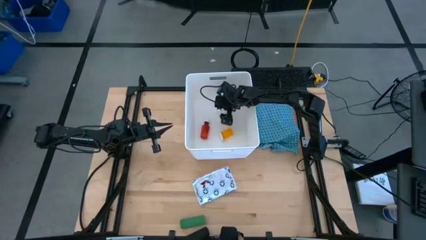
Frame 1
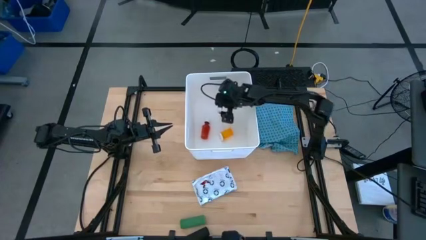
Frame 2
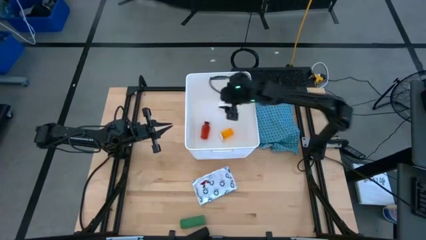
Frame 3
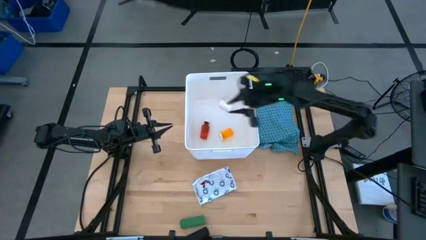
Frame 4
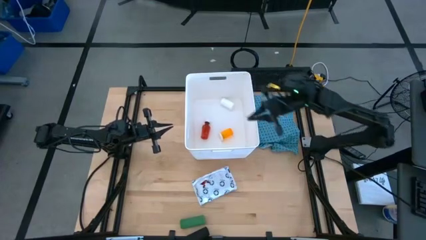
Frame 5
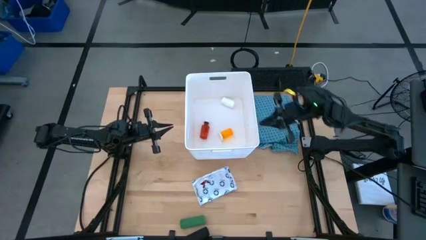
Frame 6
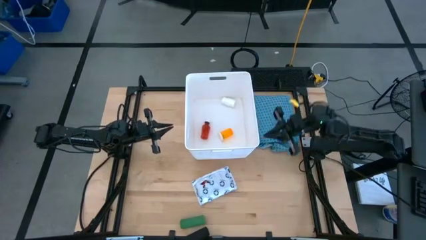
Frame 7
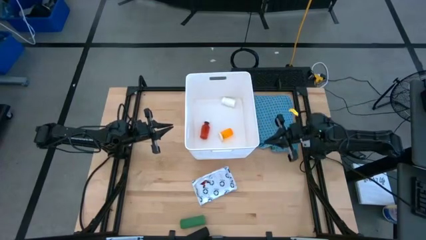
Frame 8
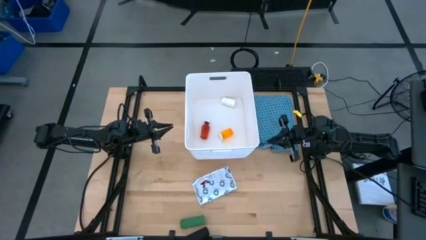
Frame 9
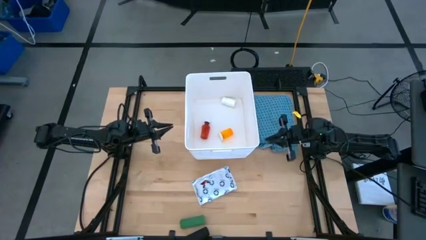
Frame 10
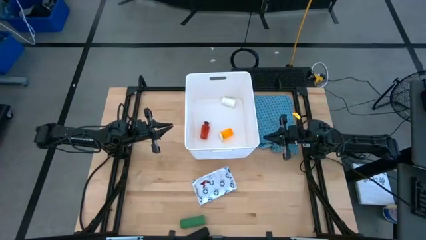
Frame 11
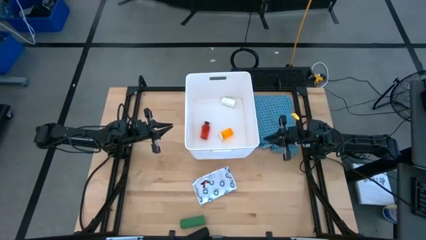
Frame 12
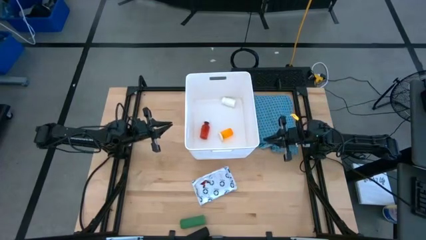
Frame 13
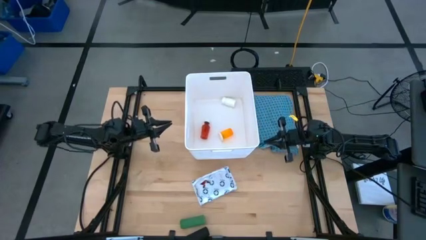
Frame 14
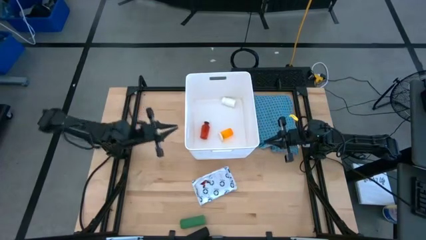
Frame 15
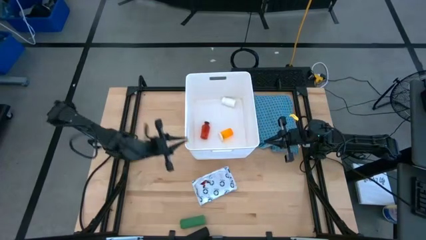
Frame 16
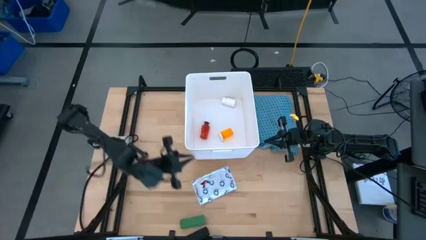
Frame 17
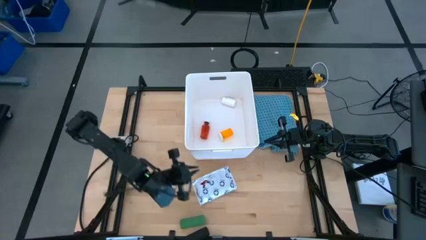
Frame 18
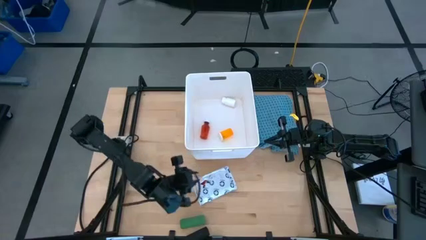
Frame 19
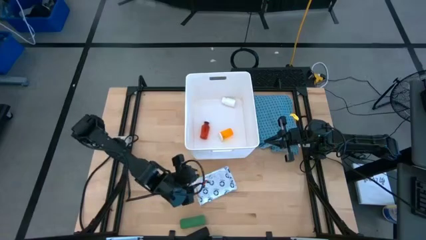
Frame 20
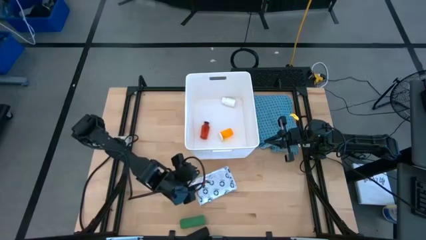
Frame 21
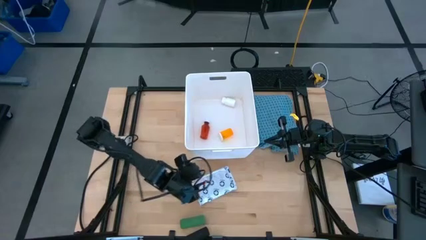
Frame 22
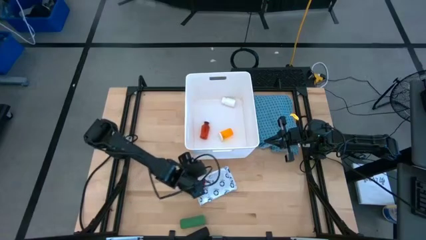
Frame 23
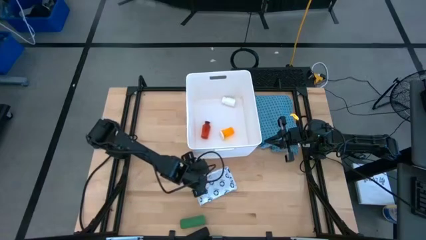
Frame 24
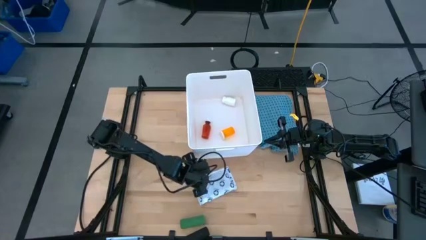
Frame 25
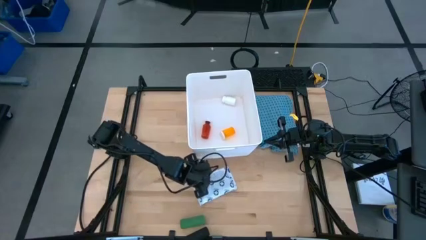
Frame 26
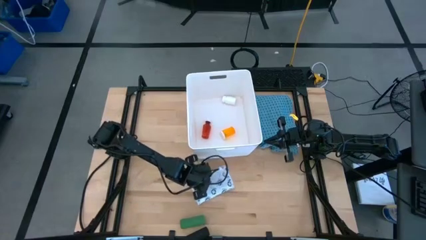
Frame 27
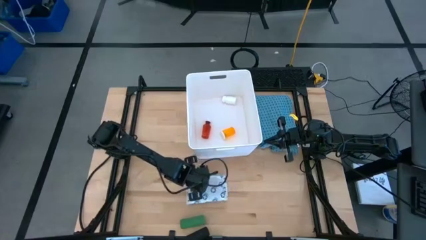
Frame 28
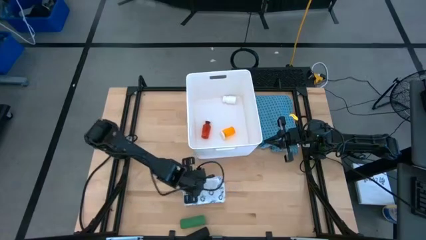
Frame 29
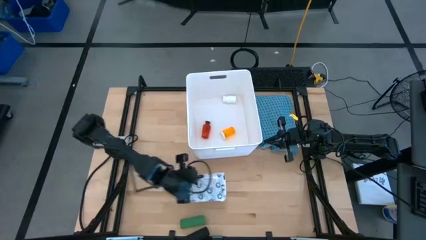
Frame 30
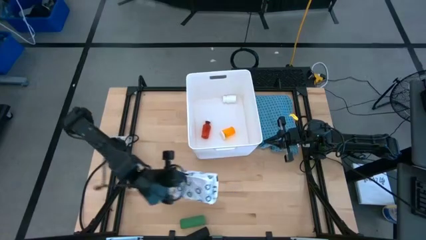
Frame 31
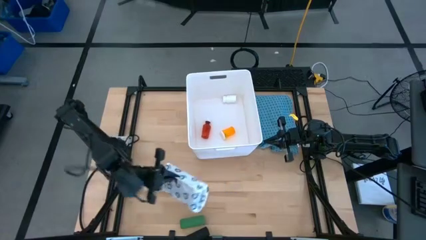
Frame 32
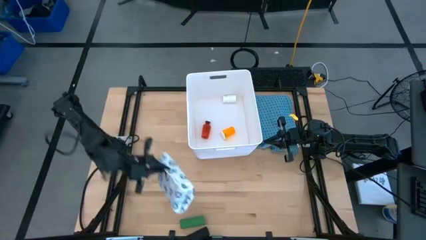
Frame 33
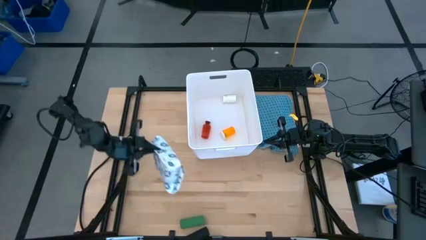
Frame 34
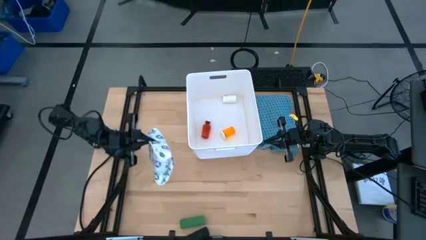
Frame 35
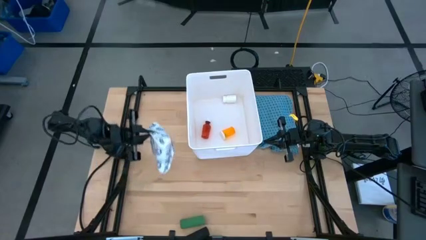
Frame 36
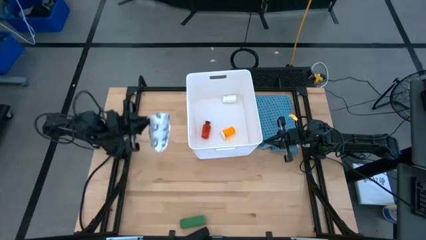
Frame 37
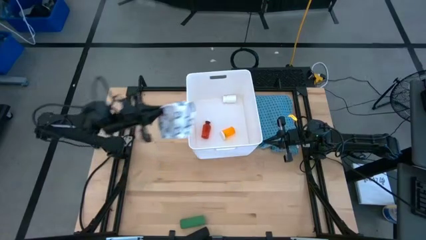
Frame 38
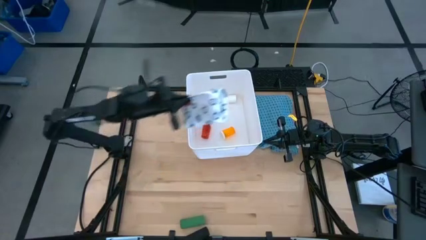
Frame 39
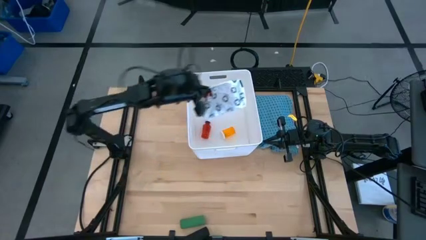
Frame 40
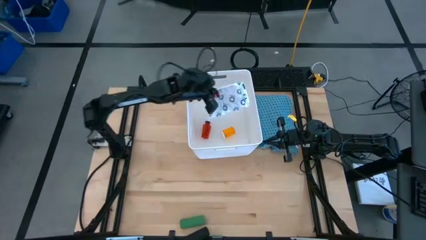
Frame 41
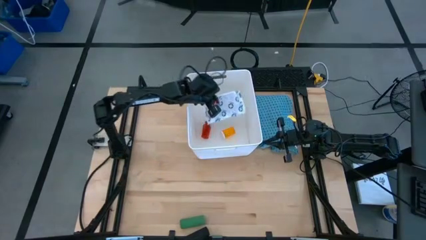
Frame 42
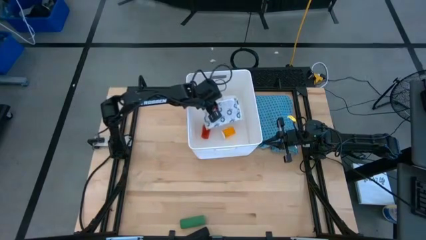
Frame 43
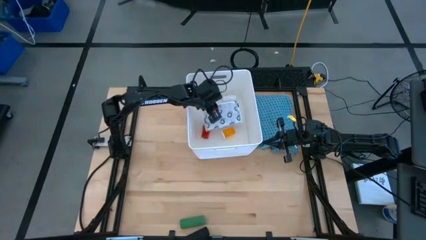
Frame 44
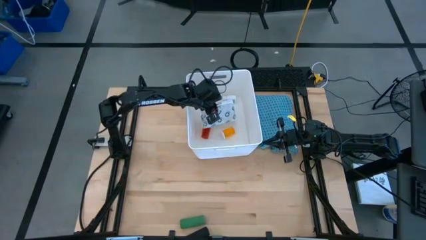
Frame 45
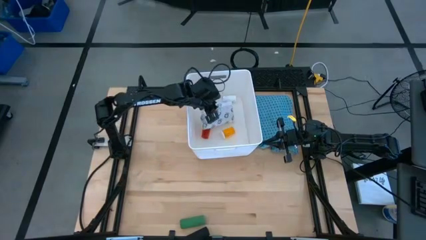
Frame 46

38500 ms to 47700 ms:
Task: Pick & place medical supplies in basket/bin
Put the mailer bag into the white bin

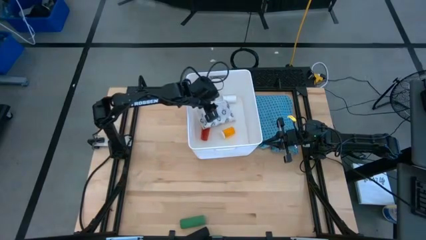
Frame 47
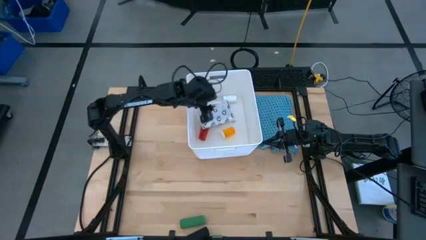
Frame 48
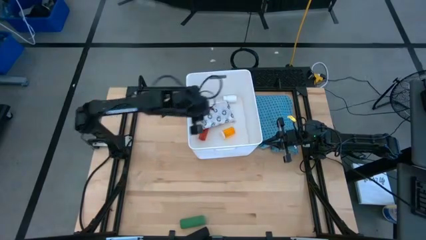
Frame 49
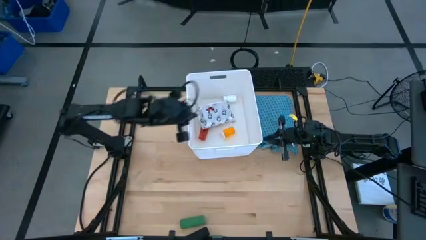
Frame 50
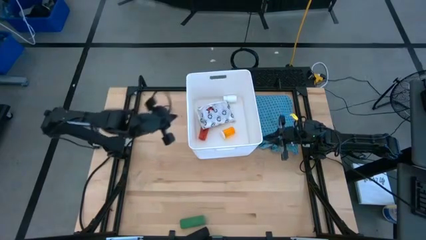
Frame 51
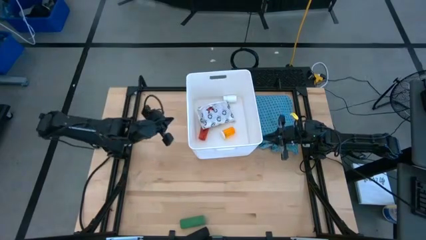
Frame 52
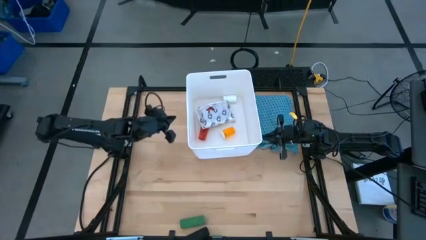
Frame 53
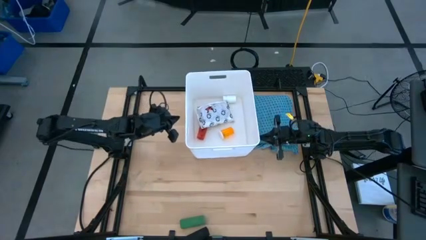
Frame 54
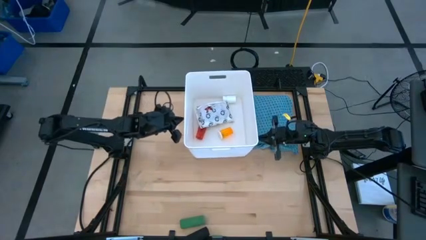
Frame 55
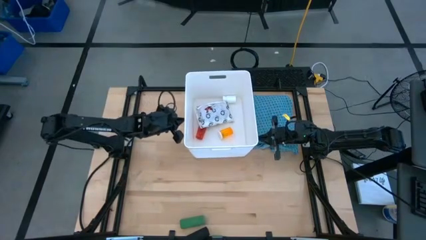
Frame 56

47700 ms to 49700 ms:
Adjust the white bin

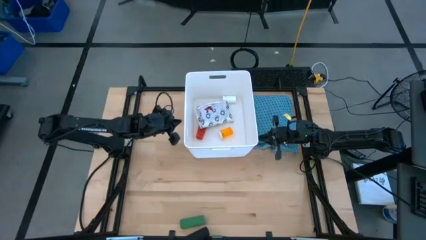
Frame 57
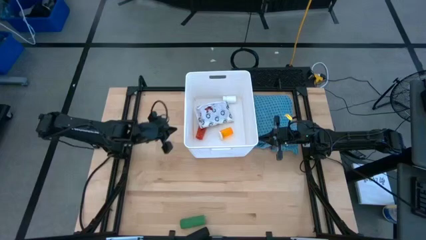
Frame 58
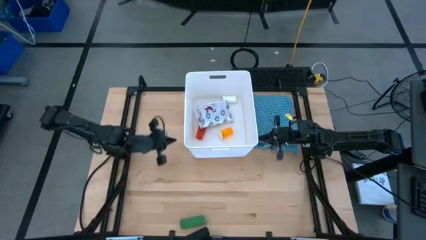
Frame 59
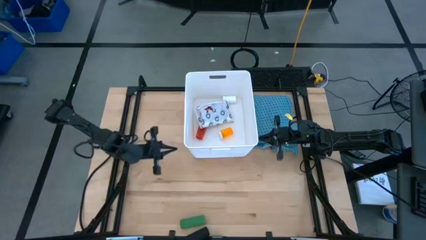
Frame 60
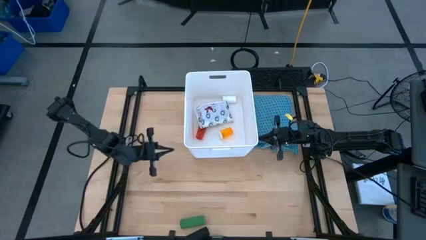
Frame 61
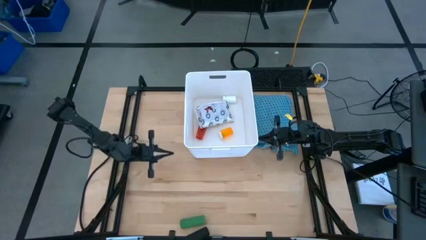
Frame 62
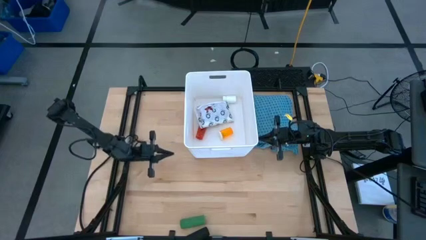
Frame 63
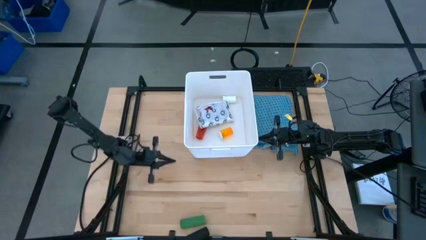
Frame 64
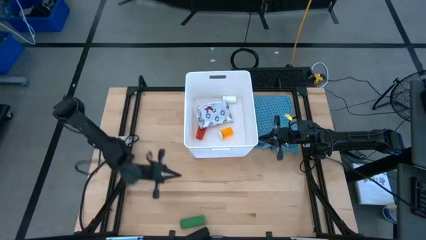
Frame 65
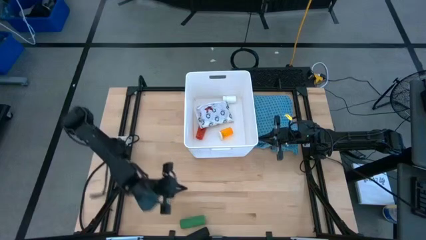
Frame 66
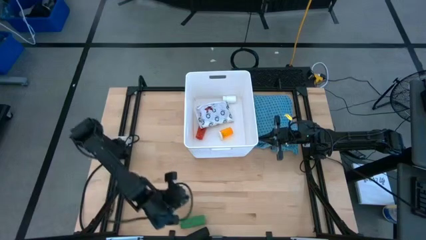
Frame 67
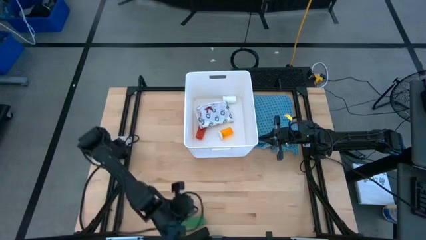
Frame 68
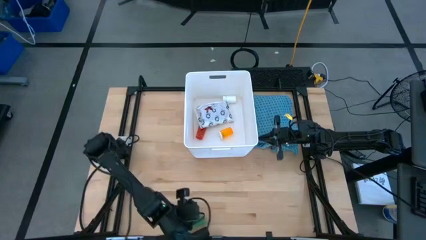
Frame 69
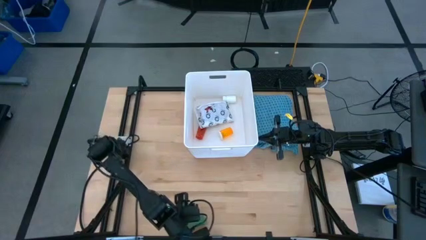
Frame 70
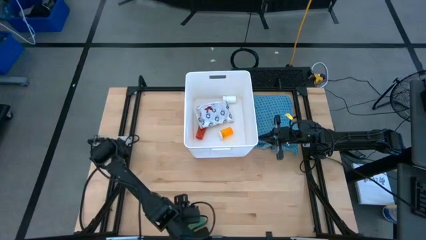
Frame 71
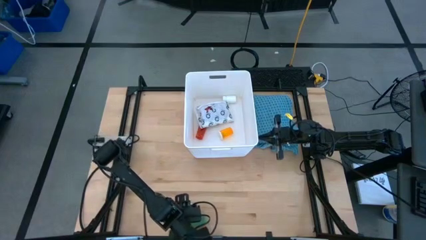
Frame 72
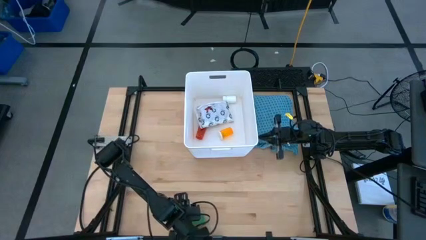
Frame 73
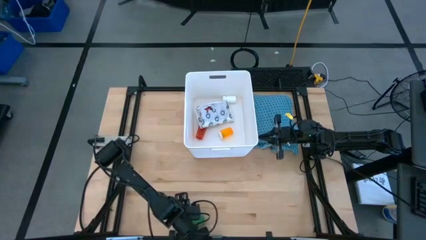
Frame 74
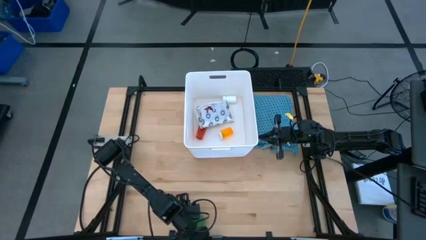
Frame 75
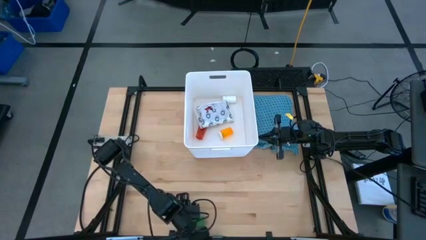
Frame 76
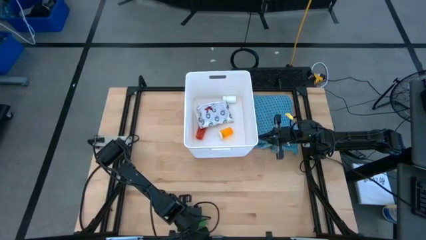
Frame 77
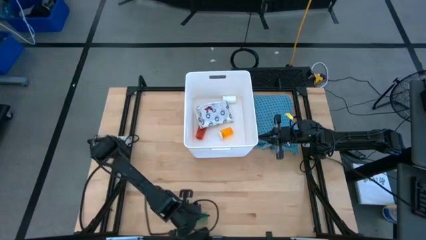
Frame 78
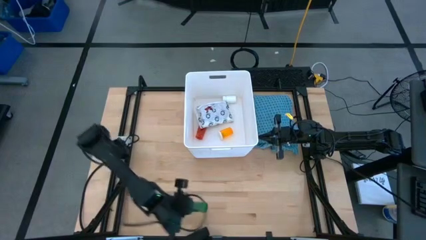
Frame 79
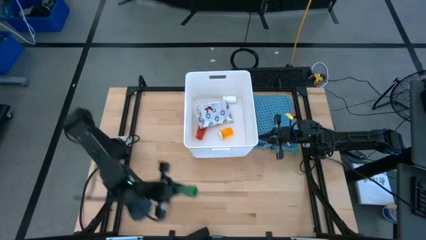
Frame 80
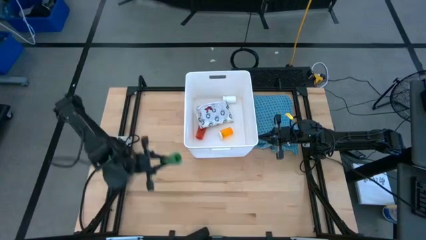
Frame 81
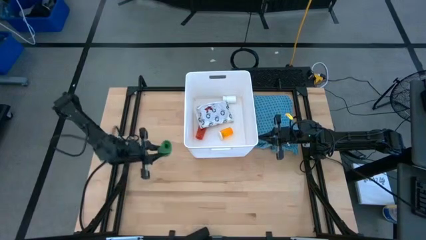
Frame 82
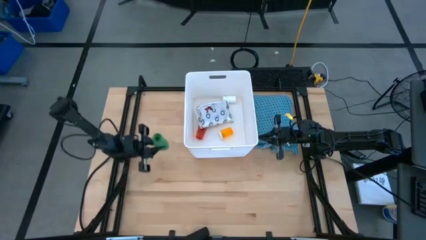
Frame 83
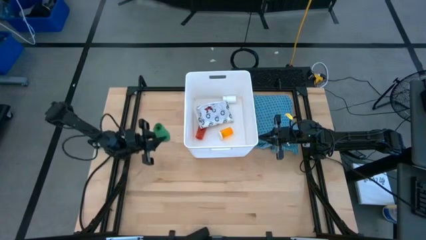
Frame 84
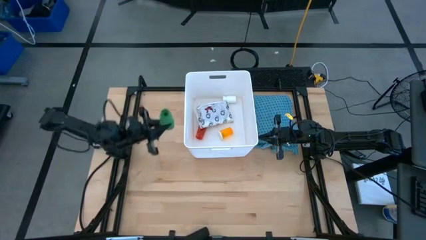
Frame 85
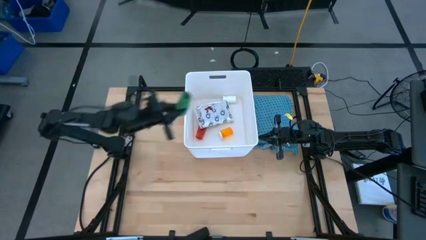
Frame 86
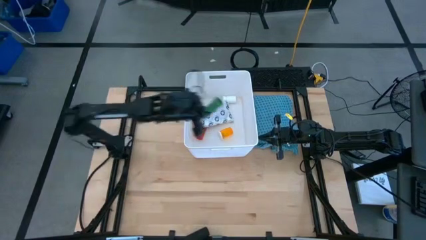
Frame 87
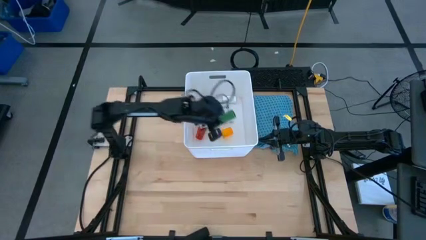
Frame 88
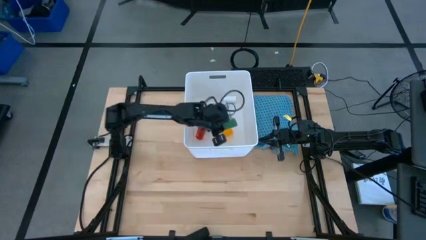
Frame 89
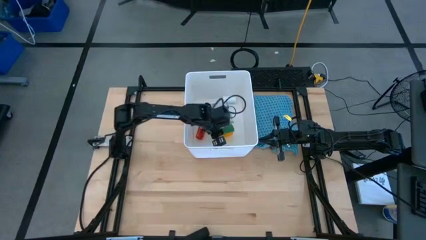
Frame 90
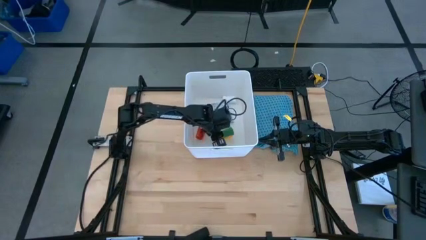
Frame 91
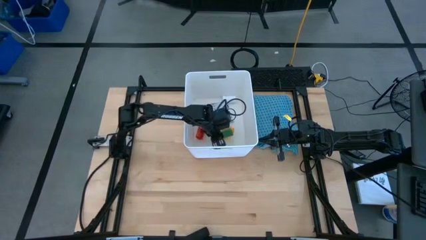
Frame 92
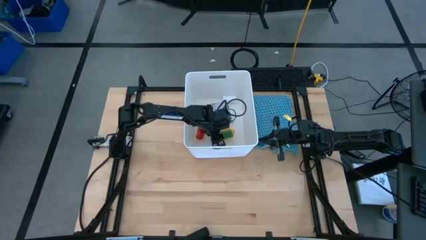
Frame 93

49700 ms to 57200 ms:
Put the green bandage into the white bin
